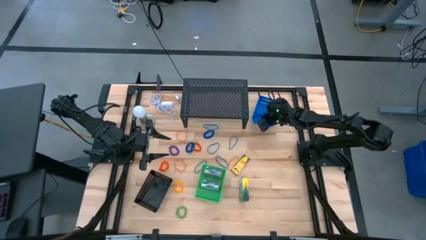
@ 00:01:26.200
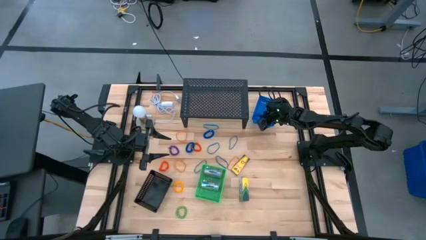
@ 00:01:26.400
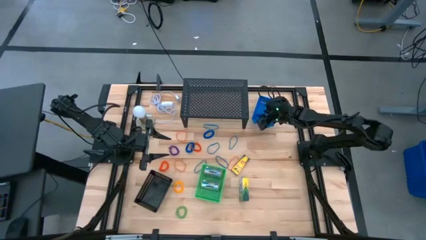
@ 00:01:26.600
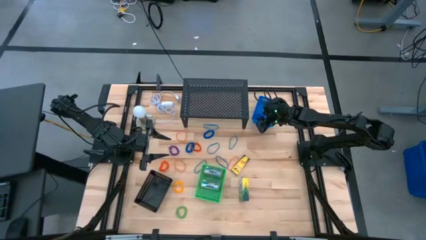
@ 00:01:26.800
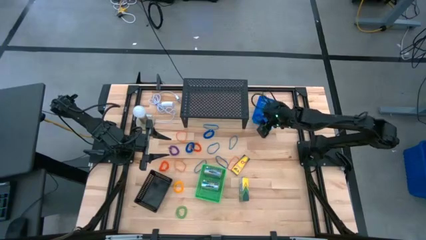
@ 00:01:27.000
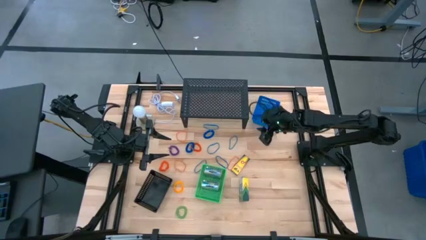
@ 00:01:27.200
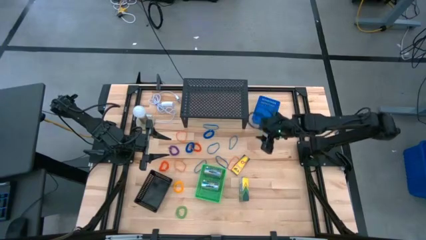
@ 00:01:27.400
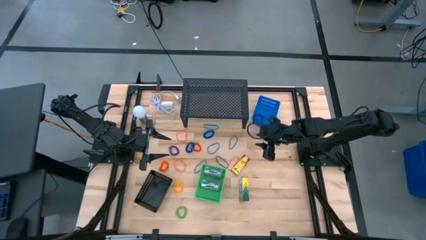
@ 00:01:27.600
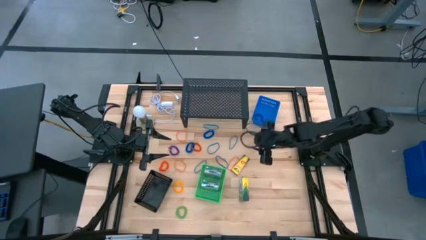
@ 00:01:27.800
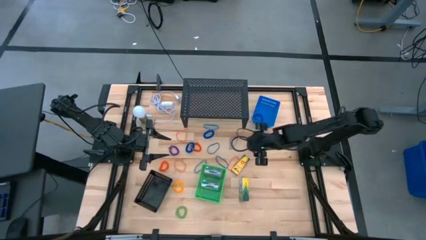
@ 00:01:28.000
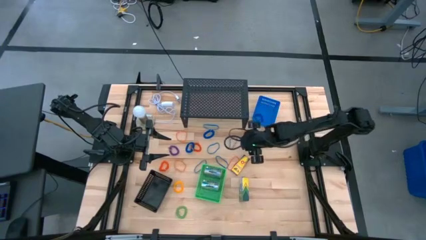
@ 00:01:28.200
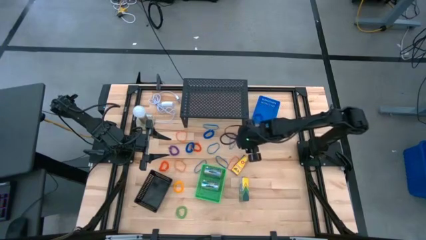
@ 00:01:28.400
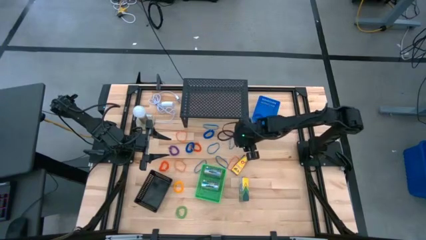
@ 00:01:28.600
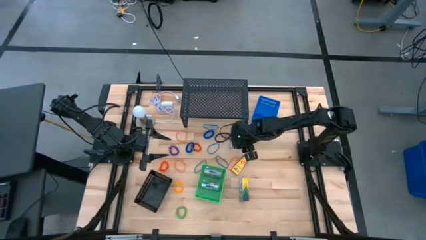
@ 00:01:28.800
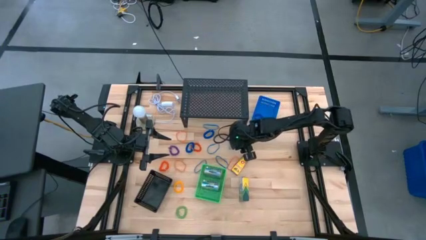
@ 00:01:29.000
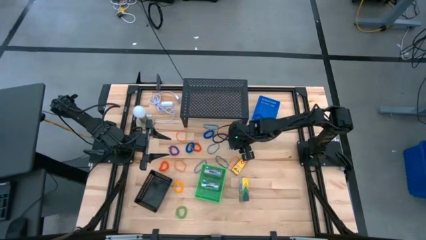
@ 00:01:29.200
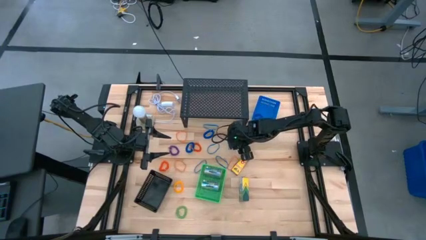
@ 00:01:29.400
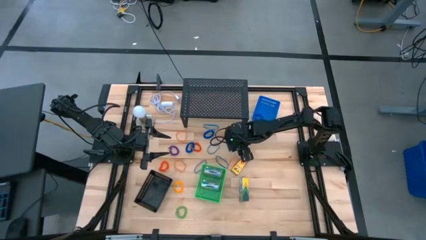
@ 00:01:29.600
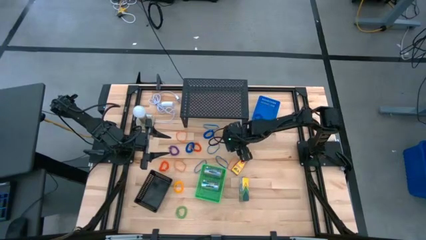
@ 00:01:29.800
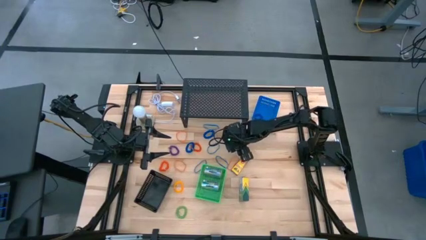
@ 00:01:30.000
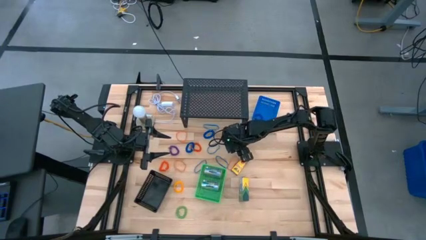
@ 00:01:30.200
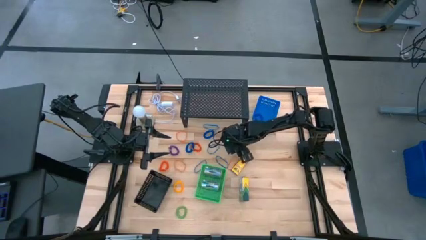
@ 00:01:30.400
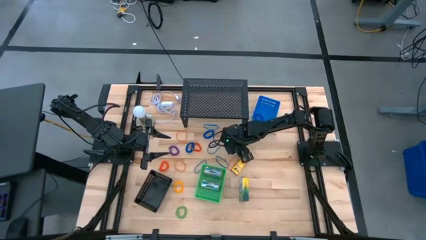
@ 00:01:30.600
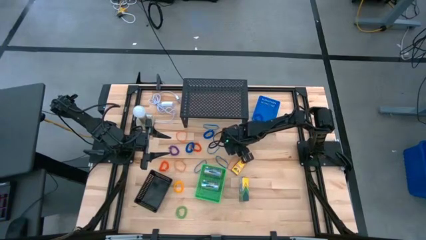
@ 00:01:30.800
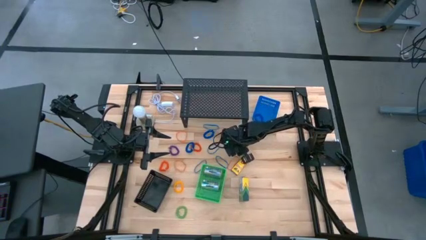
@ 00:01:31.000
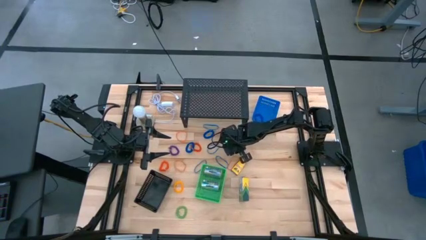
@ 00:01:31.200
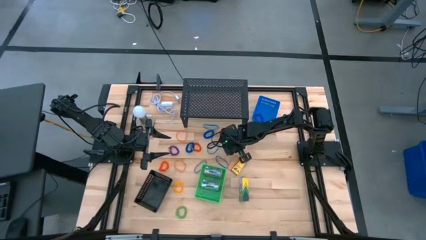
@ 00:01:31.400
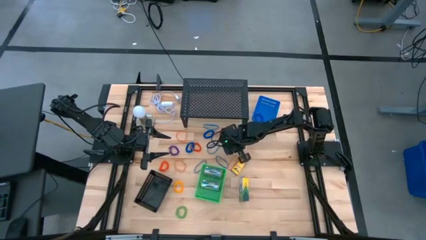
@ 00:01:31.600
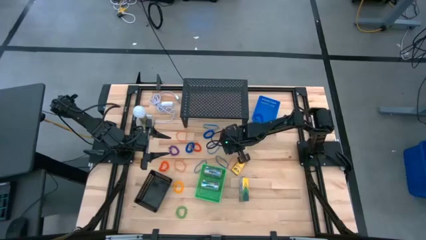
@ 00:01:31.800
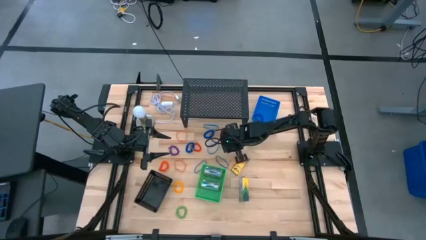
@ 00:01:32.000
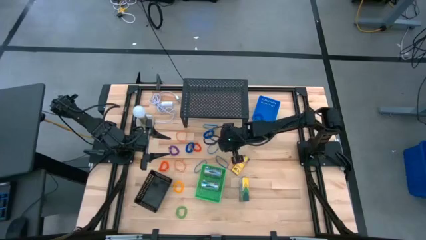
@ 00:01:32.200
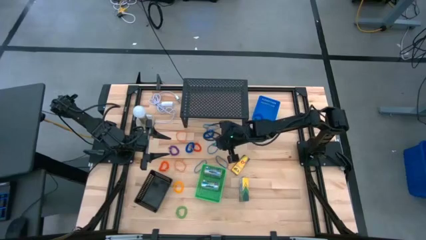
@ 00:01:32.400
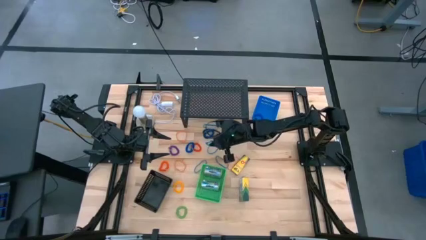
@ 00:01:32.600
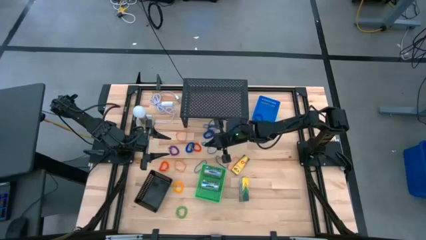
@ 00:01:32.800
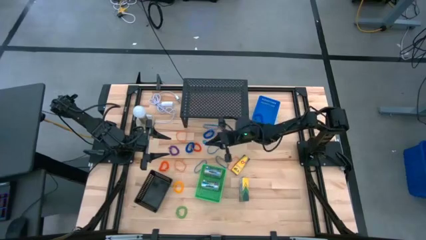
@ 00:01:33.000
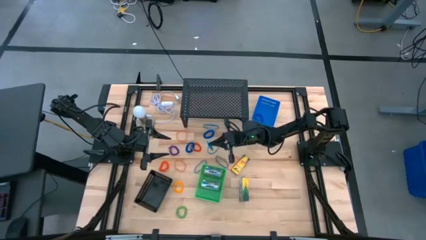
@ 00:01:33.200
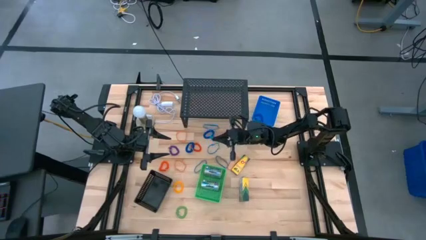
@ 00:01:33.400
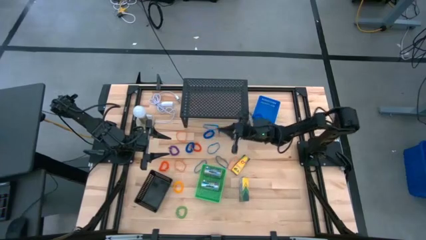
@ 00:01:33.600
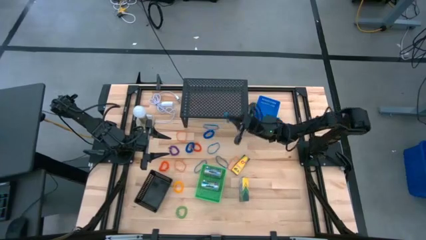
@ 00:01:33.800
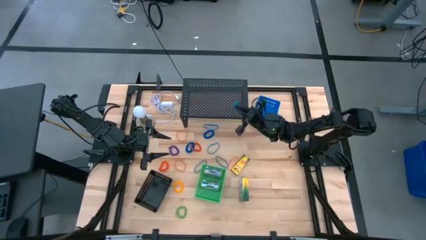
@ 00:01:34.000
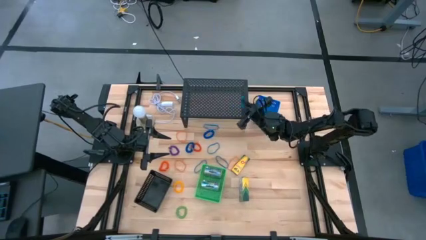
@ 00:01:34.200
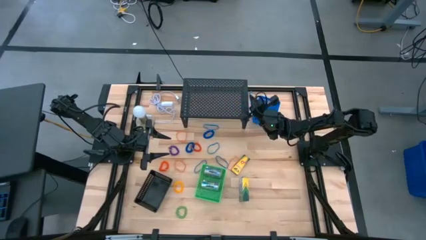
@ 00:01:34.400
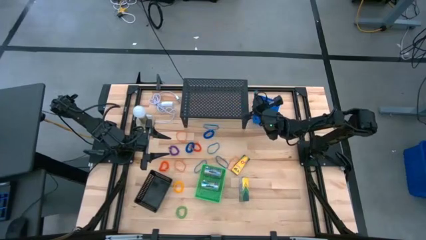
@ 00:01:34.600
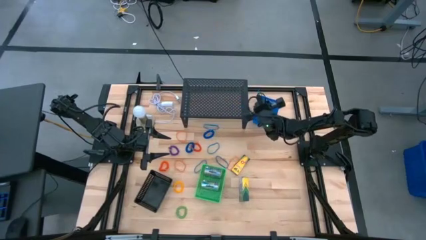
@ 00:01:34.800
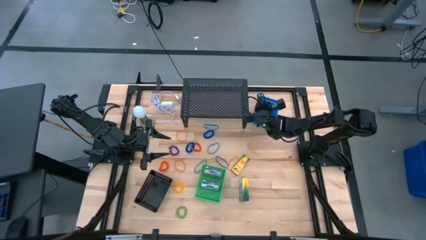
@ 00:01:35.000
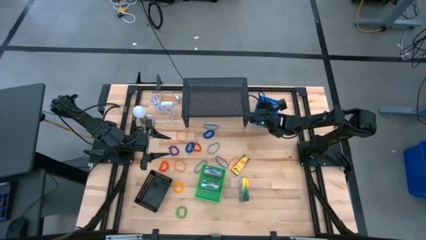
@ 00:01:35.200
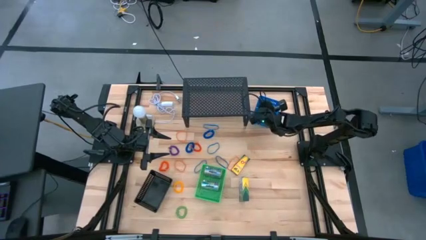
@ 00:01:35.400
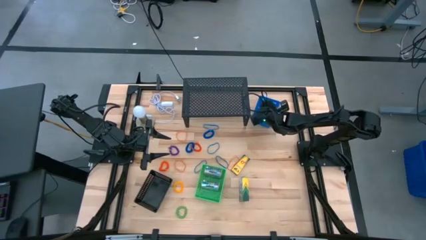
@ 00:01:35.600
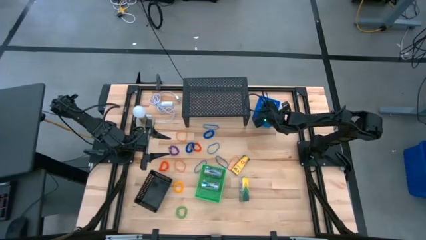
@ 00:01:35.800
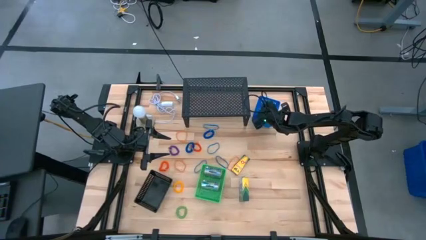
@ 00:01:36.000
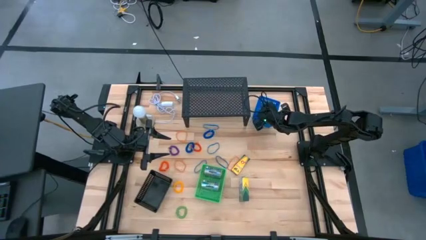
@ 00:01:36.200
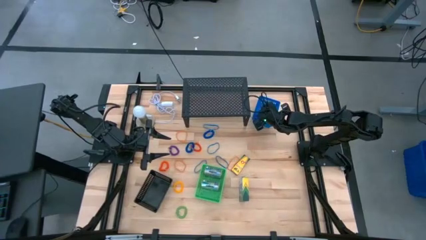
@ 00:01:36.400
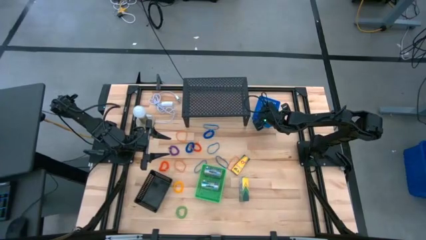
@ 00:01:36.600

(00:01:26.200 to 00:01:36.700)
Task: Pick & Place Office Desk Supplies
Put the blue rubberband into the blue bin

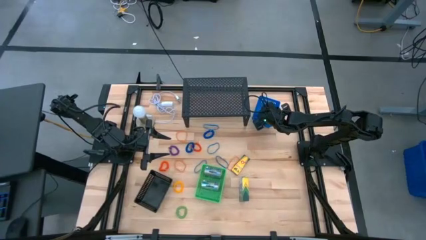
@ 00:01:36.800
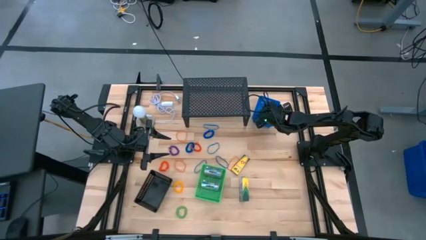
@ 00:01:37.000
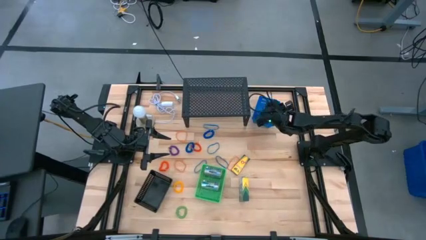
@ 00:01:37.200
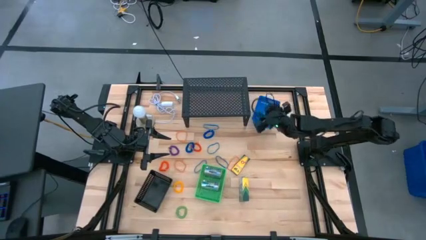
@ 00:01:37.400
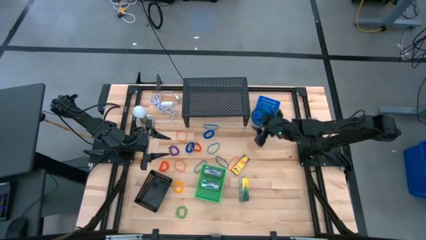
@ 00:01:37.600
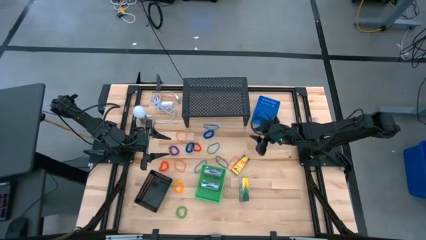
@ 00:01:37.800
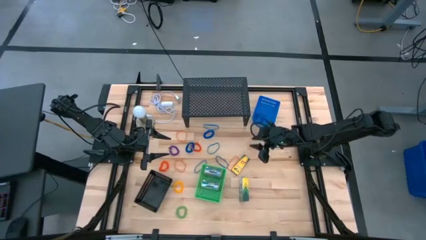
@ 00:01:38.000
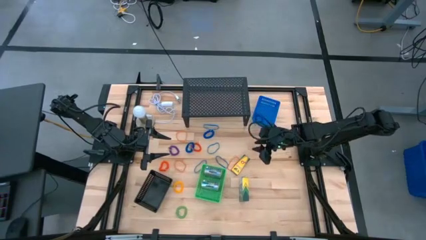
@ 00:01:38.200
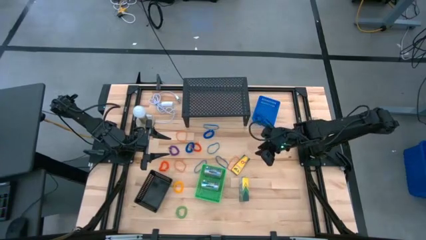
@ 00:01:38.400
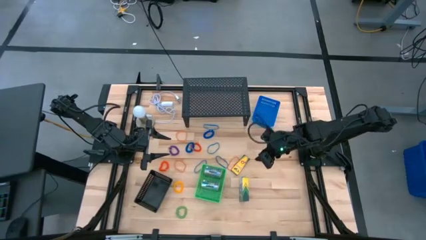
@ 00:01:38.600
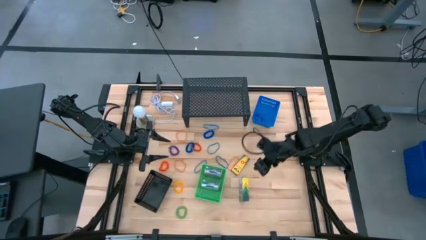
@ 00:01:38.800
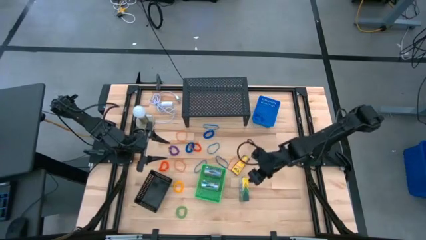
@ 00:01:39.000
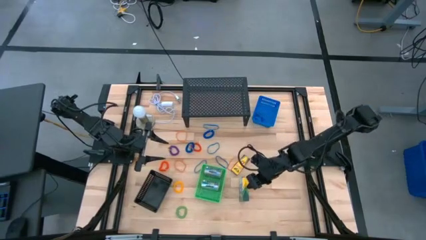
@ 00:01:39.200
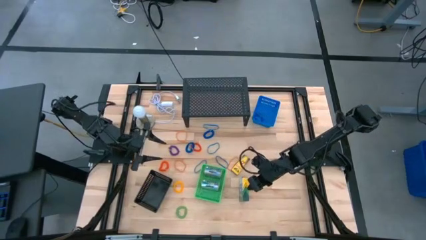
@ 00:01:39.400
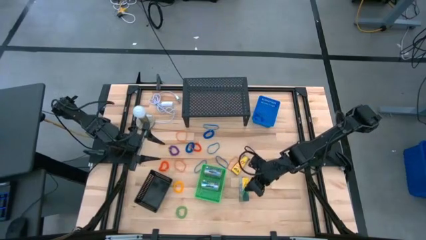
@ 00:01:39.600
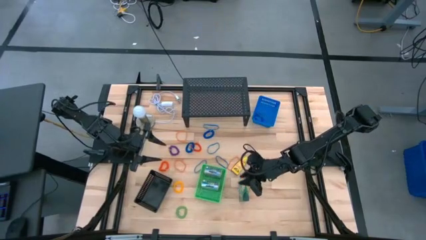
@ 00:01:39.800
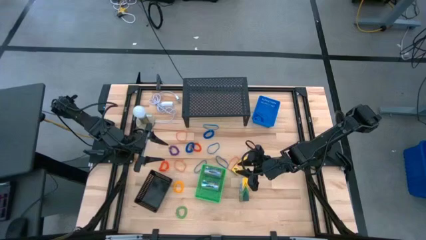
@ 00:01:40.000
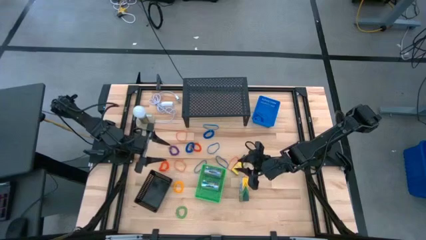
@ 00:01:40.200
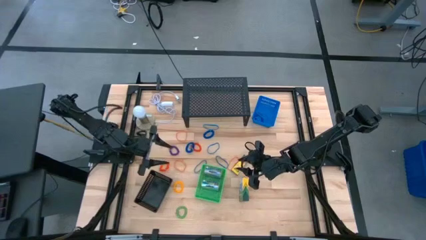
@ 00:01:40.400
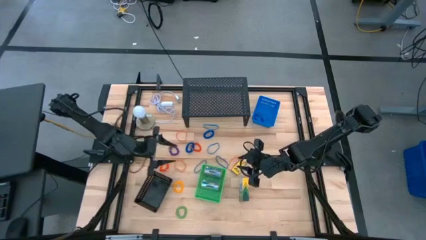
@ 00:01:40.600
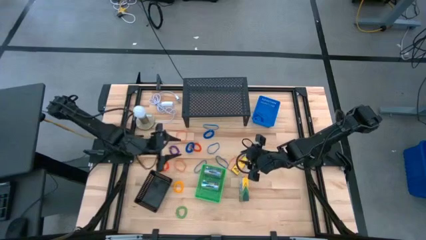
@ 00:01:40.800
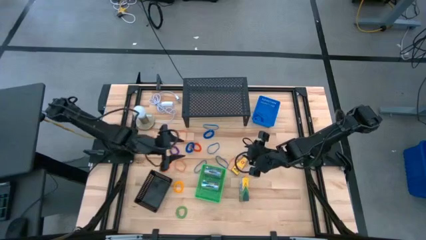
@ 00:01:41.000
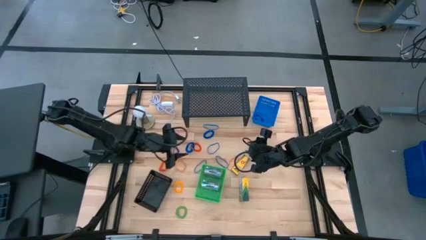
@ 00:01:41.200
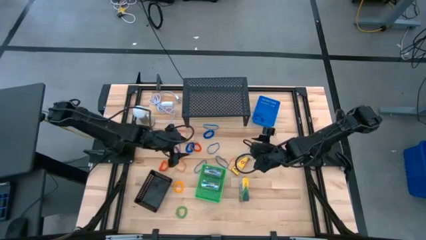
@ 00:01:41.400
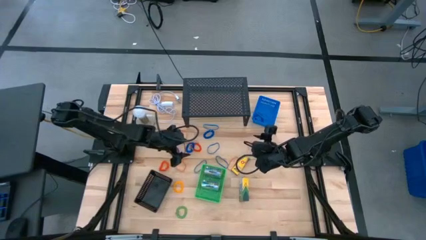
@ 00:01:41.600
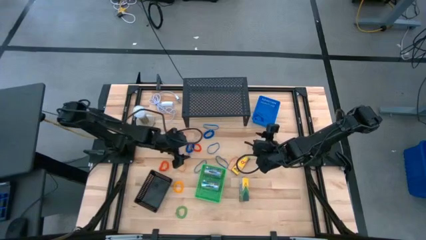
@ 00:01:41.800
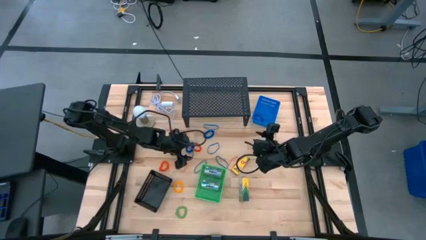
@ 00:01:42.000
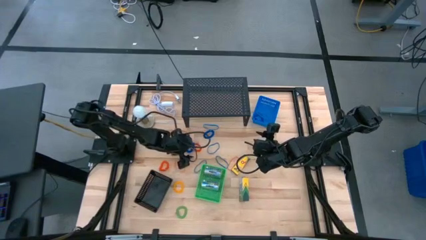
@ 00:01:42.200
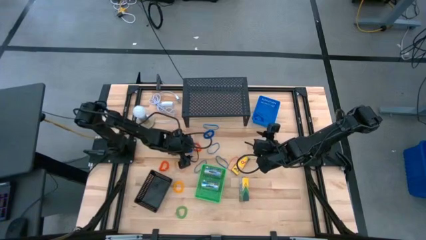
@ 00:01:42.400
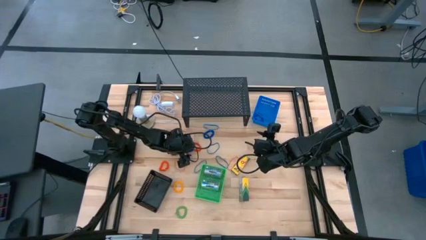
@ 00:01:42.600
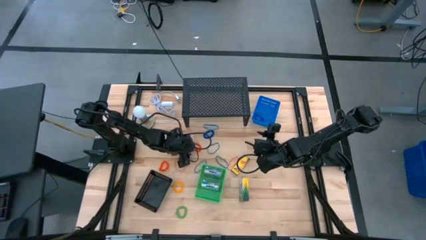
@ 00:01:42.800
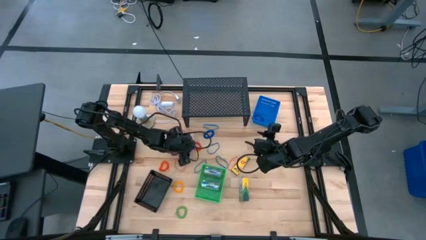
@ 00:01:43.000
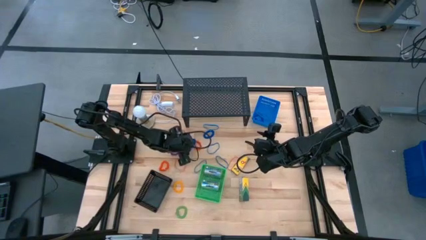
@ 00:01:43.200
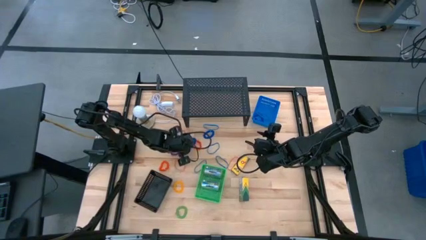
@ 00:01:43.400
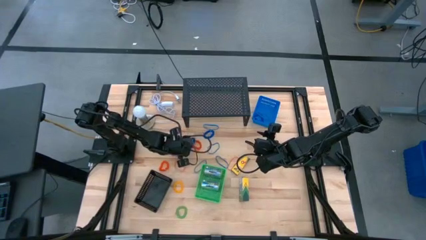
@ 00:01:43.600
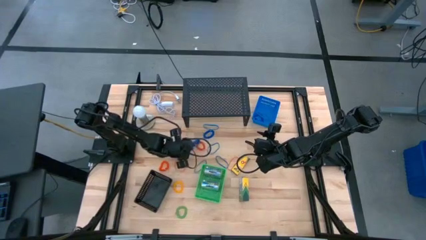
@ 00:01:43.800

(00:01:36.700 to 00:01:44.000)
Put the blue spring rubberband into the black bin
